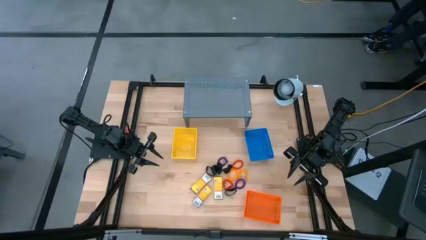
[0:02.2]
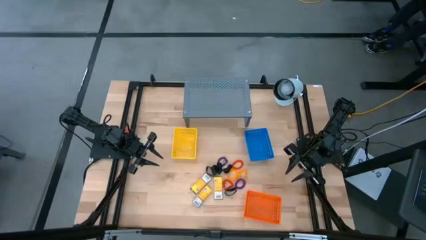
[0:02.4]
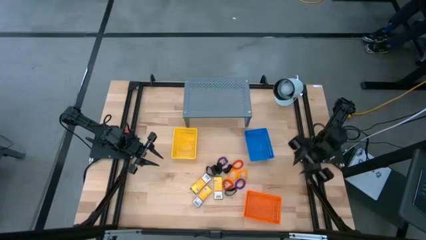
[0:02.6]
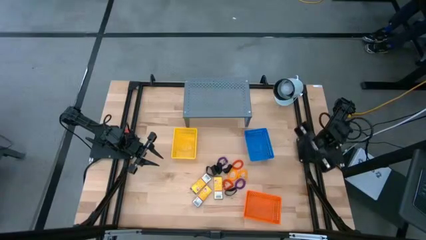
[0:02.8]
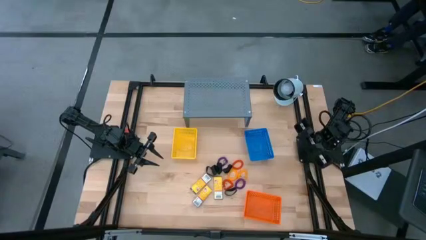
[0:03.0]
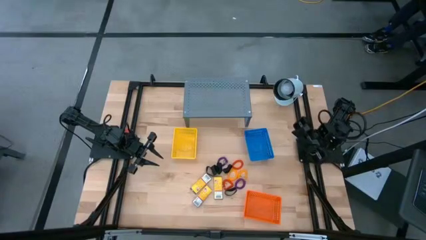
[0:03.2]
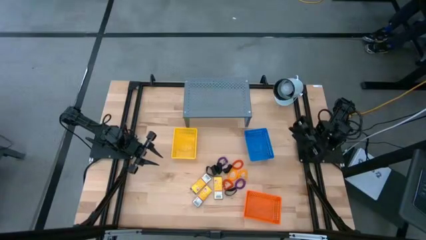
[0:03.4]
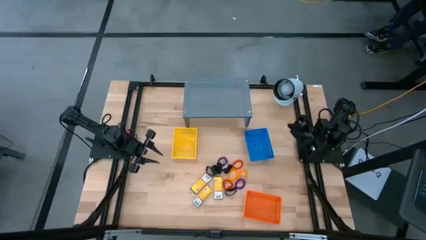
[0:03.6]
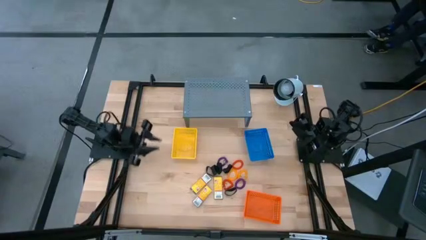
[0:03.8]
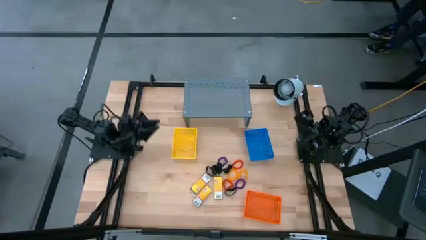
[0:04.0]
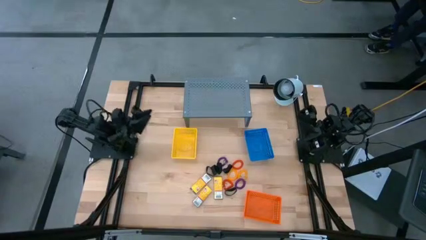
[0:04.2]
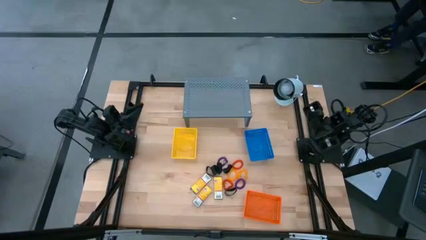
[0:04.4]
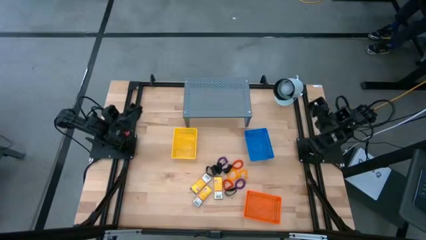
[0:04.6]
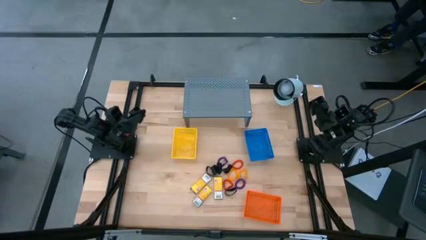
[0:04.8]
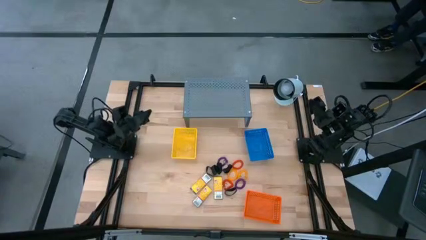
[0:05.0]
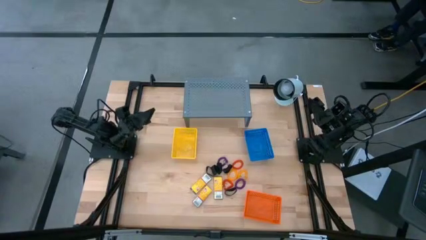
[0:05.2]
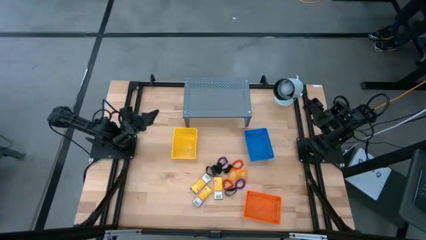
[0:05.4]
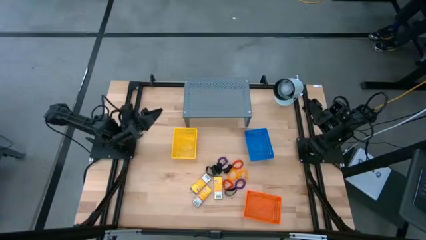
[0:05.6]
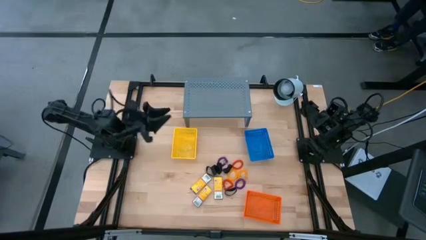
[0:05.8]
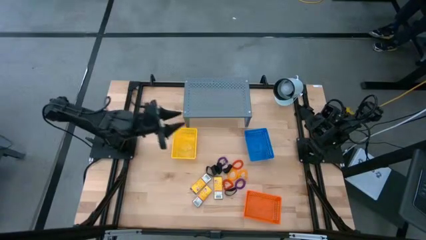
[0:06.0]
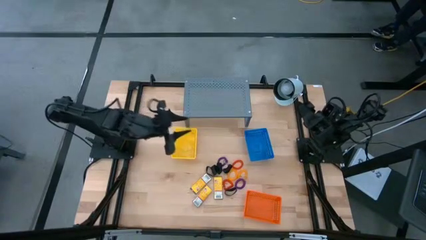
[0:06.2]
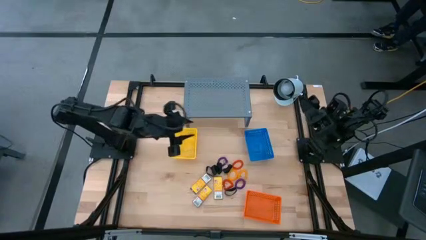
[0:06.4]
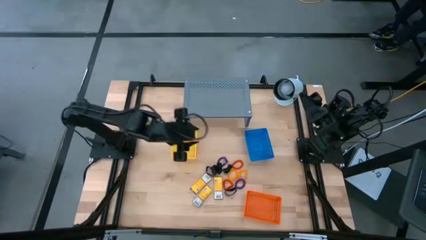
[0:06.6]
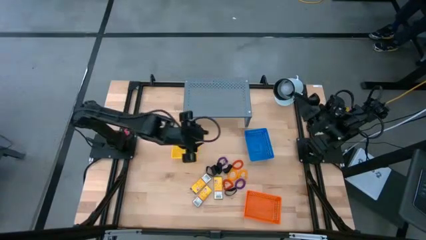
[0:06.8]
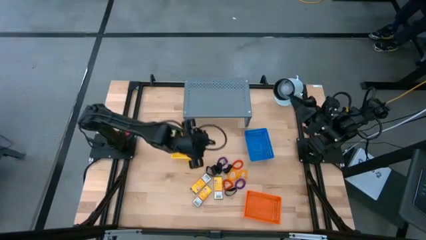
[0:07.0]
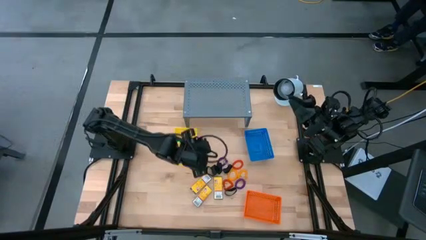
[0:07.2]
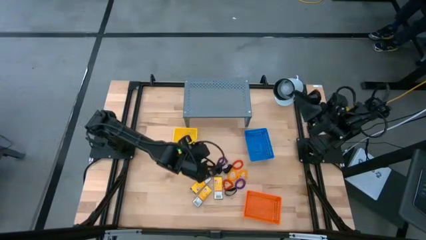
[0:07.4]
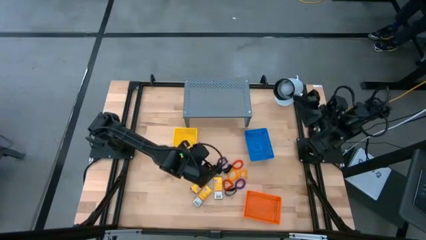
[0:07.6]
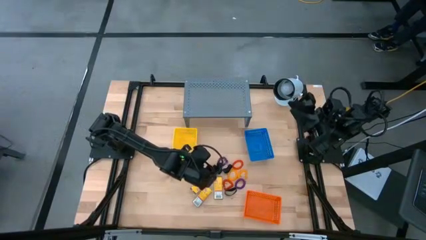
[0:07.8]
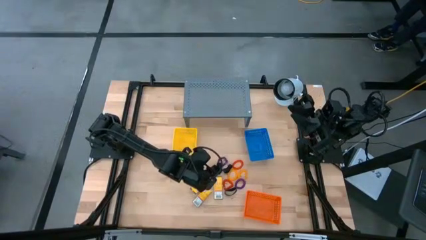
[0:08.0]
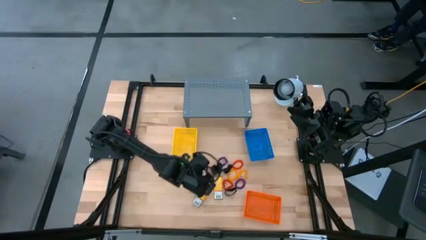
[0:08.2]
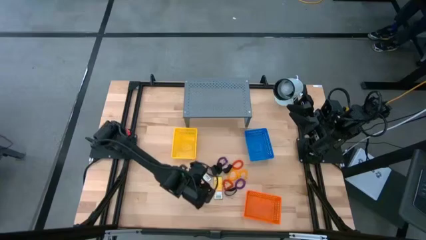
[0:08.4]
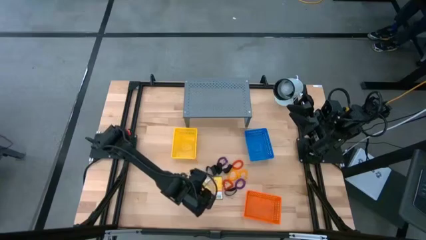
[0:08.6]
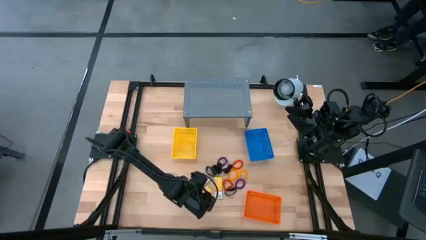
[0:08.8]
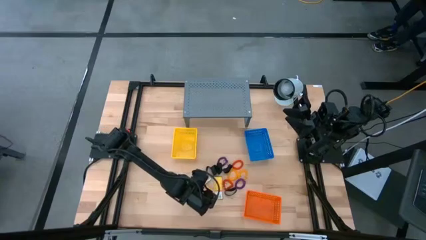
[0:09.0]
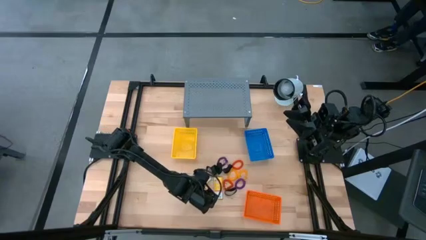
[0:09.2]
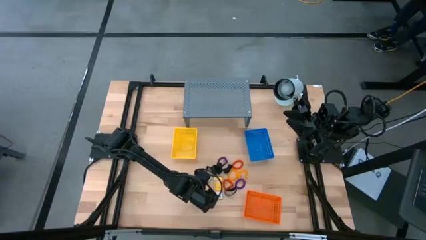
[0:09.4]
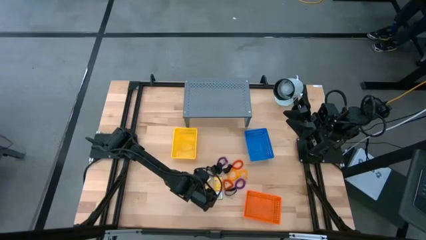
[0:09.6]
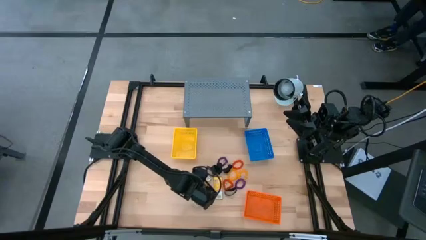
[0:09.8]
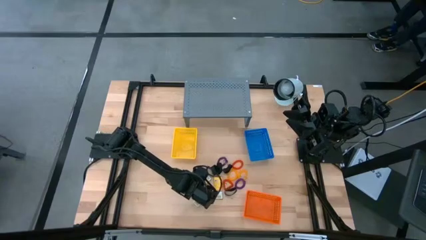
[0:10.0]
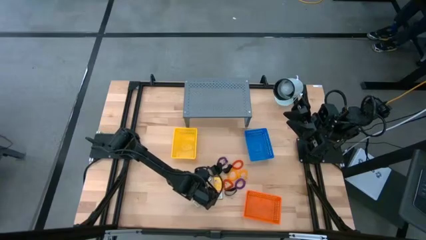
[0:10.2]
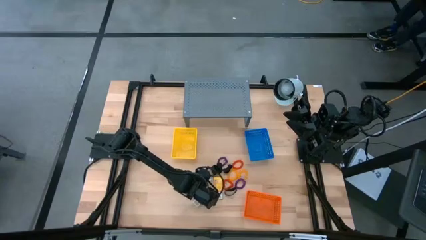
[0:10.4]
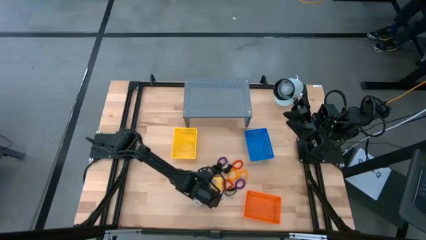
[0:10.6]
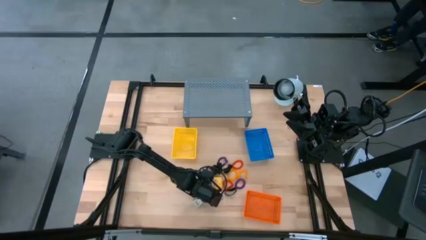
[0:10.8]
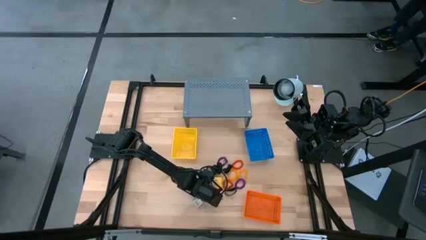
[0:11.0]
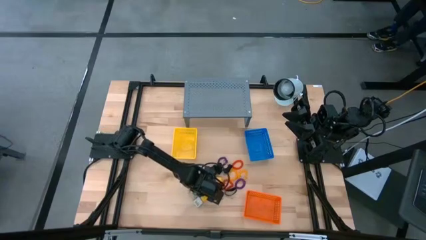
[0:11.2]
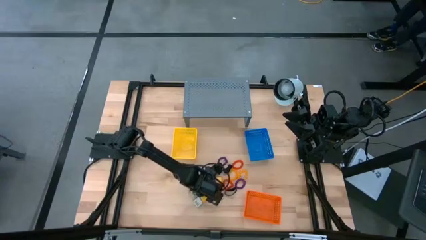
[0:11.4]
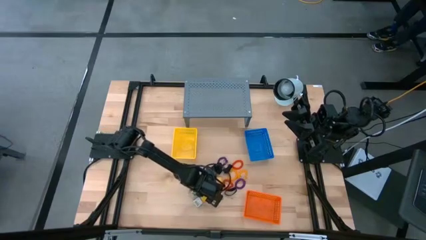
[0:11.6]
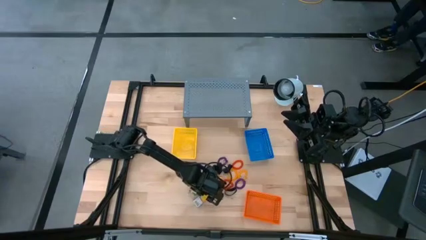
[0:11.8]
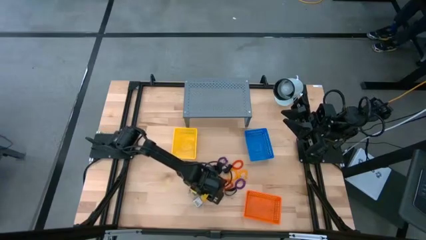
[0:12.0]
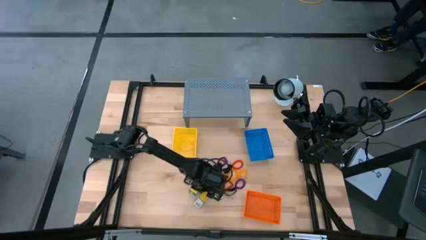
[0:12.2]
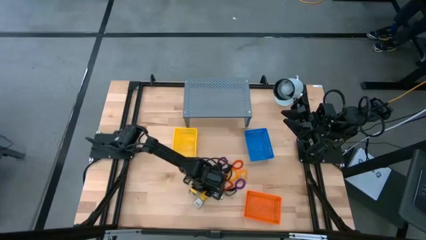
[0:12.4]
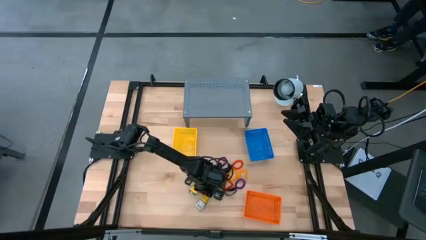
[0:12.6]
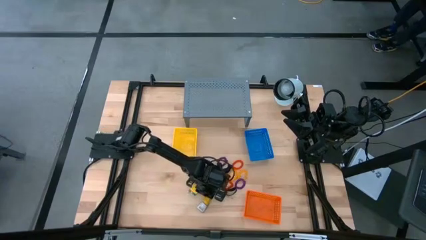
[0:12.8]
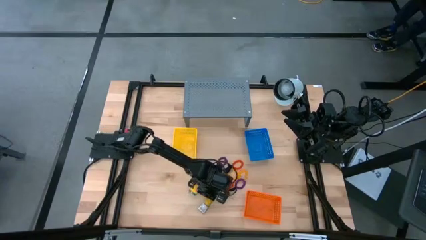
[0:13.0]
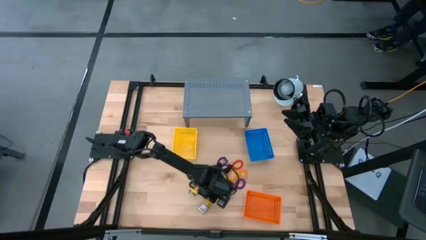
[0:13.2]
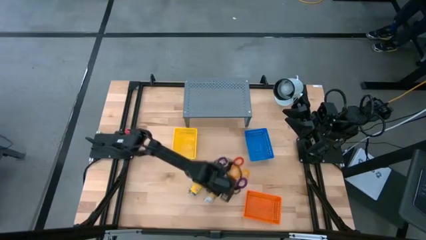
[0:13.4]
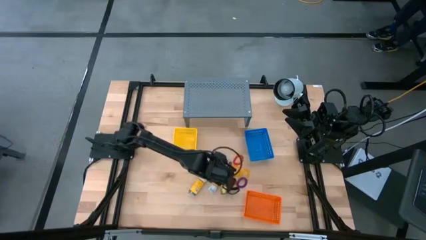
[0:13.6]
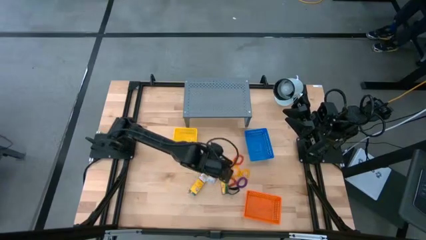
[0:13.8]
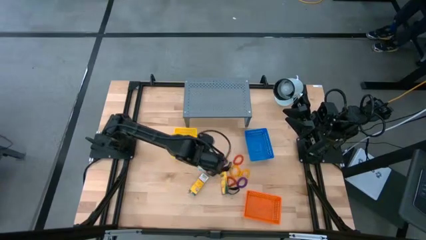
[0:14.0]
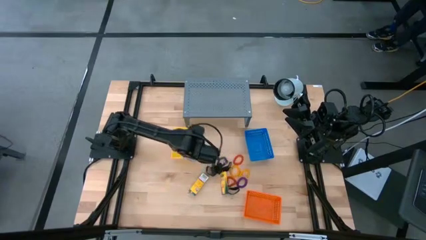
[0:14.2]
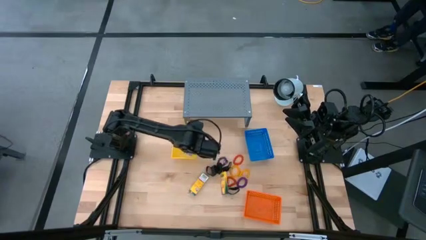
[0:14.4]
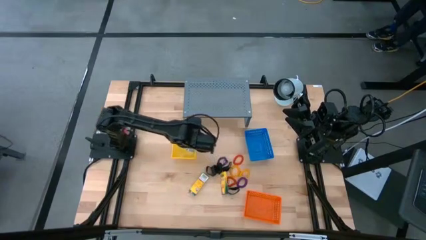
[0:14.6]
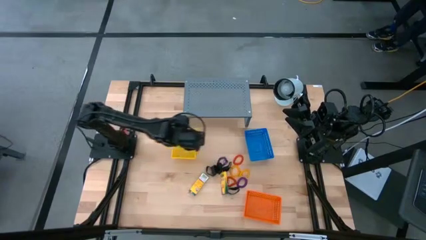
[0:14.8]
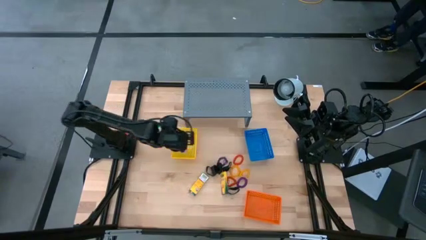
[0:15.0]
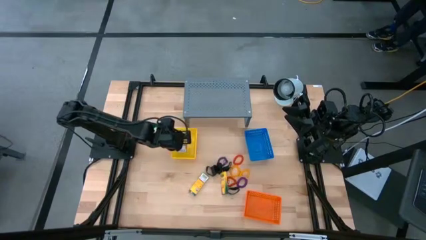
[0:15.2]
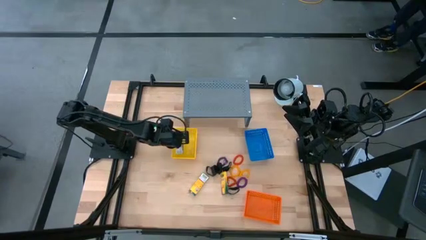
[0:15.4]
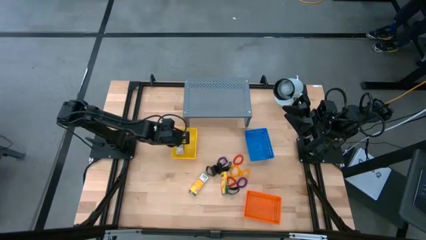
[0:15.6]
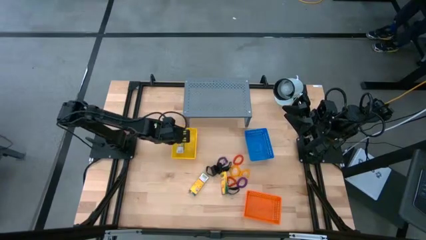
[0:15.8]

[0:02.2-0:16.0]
Task: Pick & Place Office Desk Supplies
Put the yellow box of crayons into the yellow bin
